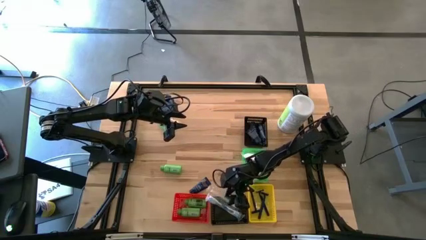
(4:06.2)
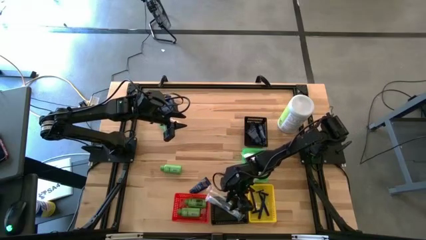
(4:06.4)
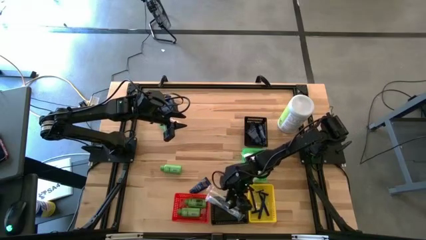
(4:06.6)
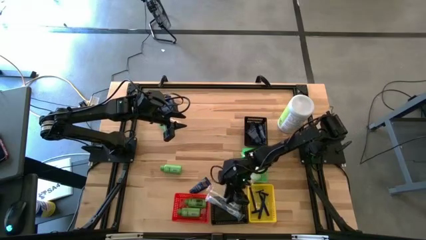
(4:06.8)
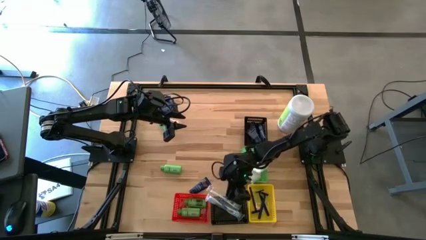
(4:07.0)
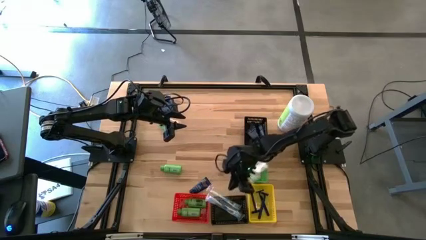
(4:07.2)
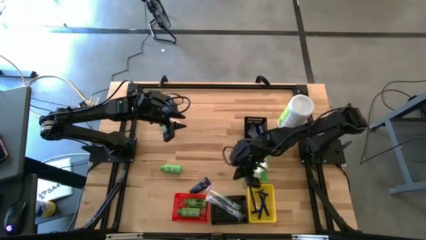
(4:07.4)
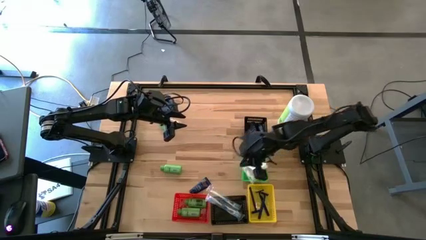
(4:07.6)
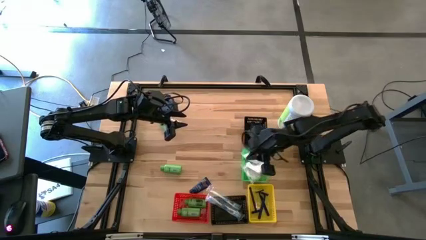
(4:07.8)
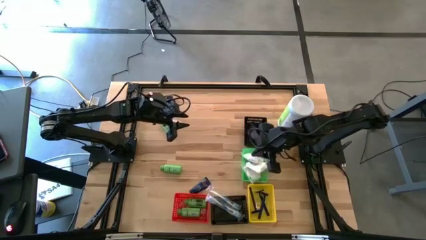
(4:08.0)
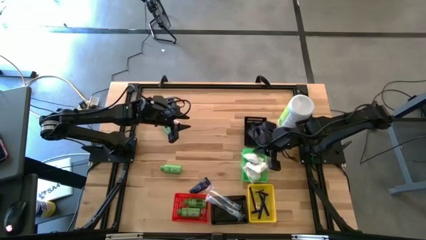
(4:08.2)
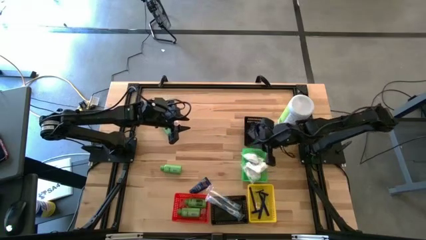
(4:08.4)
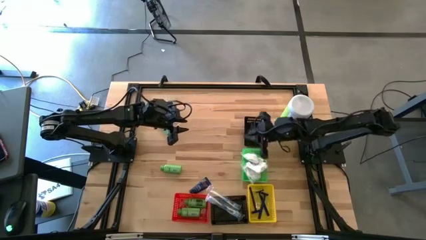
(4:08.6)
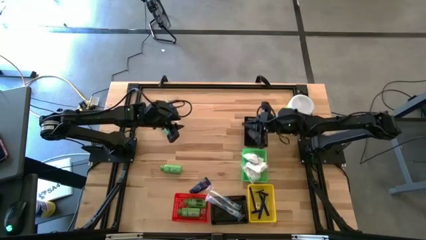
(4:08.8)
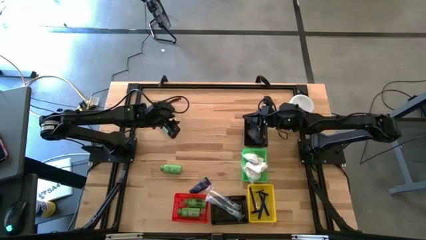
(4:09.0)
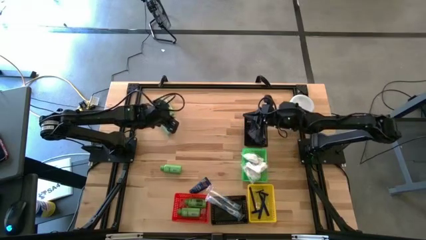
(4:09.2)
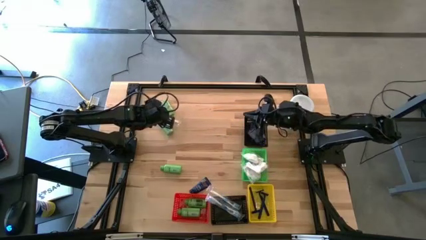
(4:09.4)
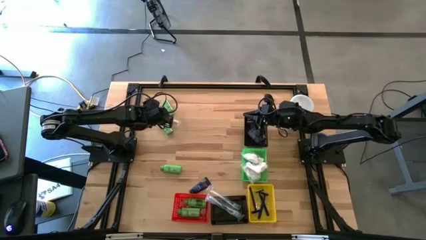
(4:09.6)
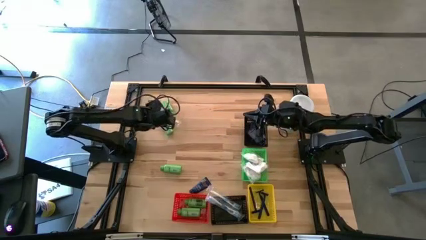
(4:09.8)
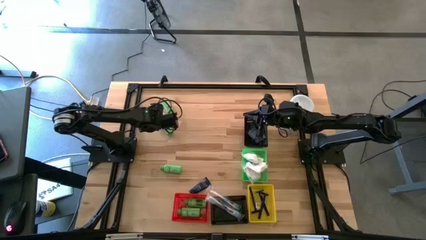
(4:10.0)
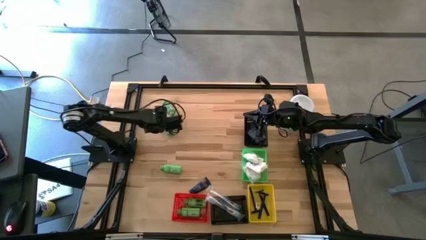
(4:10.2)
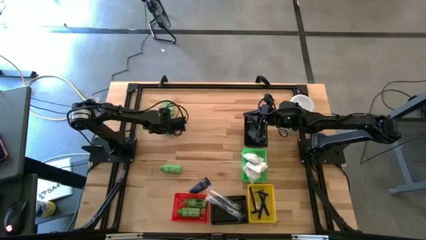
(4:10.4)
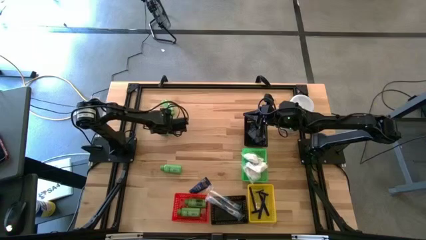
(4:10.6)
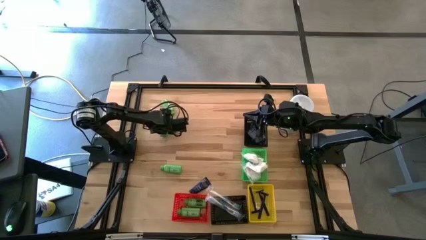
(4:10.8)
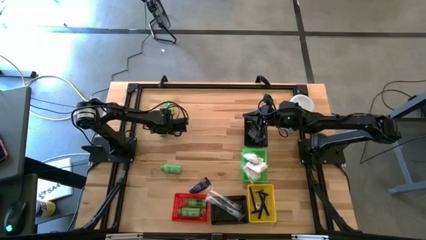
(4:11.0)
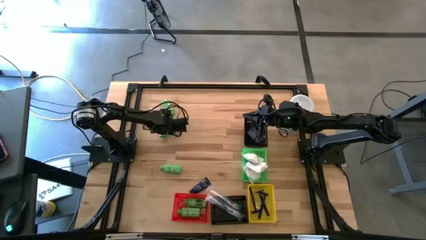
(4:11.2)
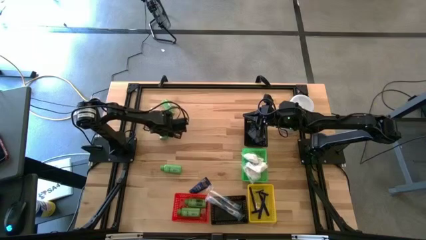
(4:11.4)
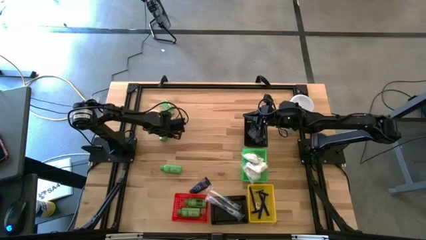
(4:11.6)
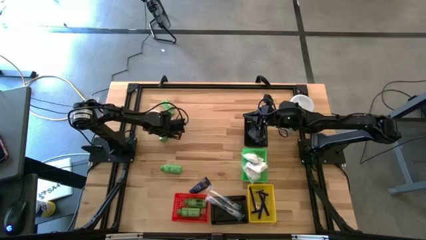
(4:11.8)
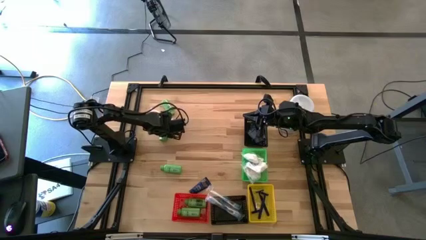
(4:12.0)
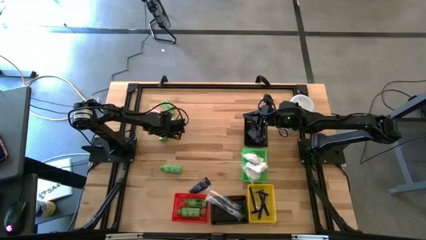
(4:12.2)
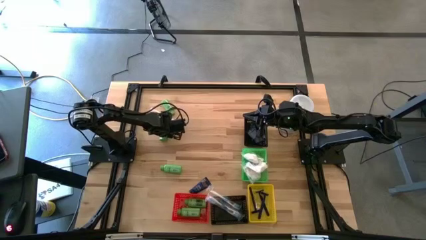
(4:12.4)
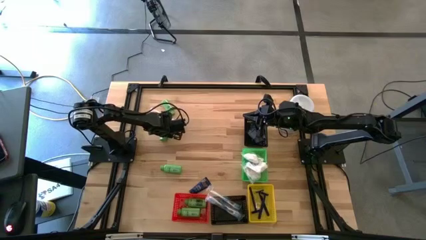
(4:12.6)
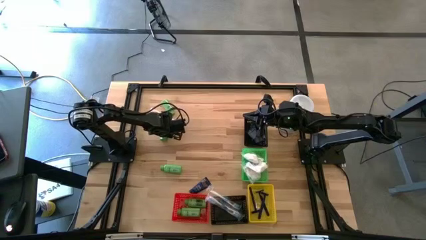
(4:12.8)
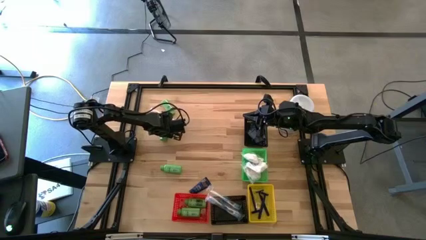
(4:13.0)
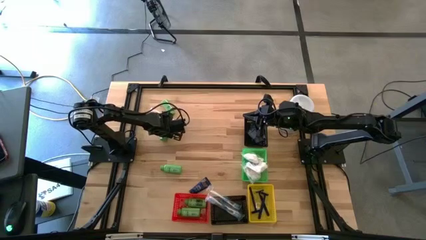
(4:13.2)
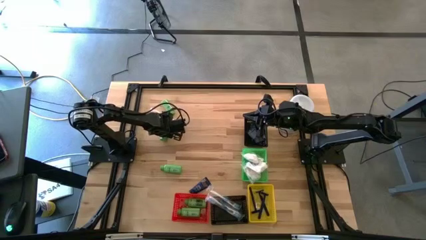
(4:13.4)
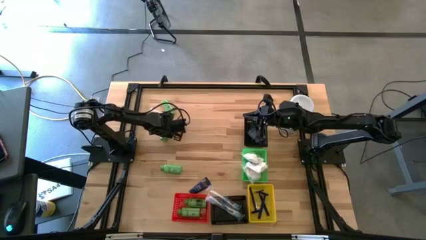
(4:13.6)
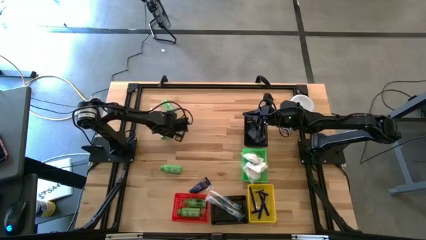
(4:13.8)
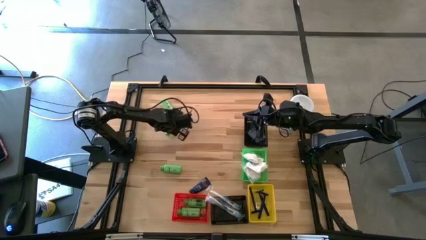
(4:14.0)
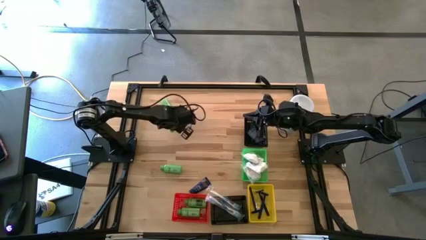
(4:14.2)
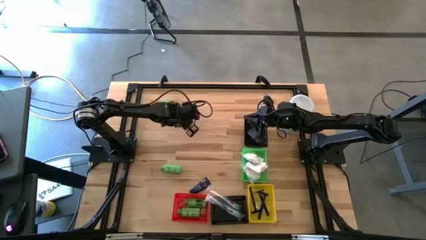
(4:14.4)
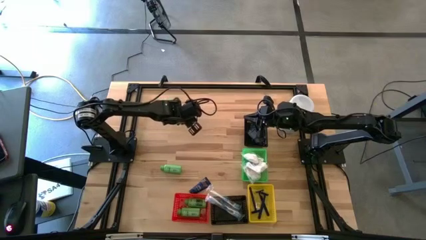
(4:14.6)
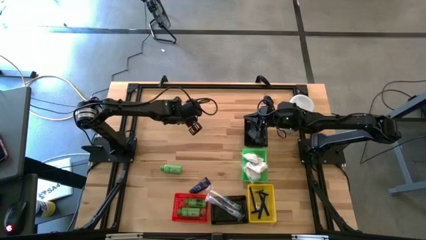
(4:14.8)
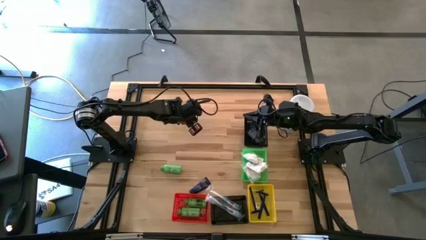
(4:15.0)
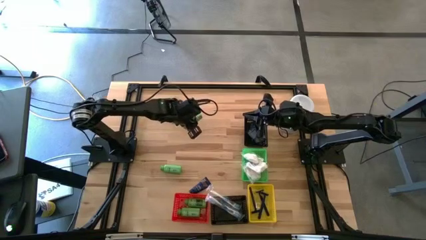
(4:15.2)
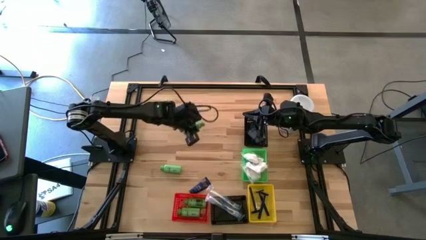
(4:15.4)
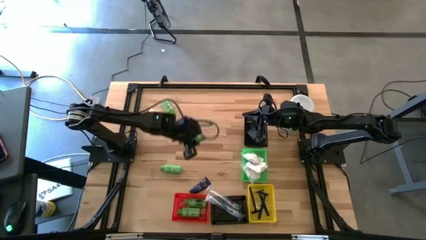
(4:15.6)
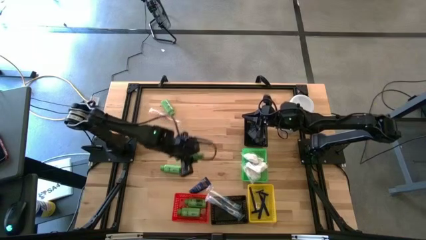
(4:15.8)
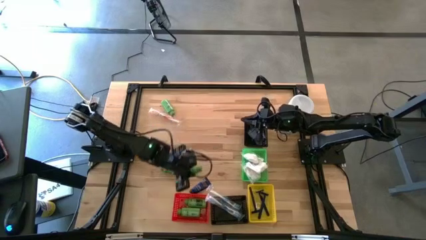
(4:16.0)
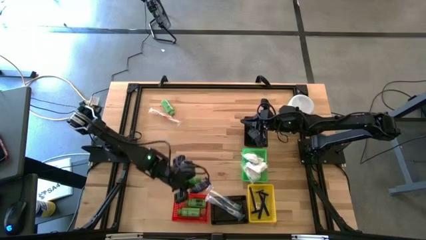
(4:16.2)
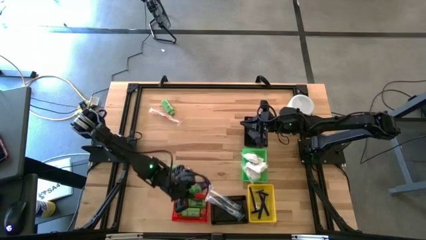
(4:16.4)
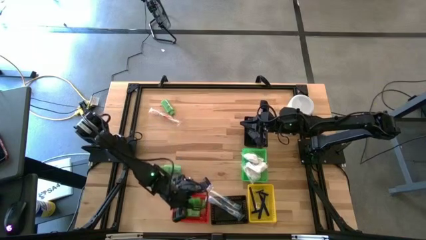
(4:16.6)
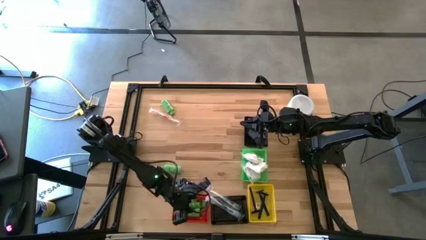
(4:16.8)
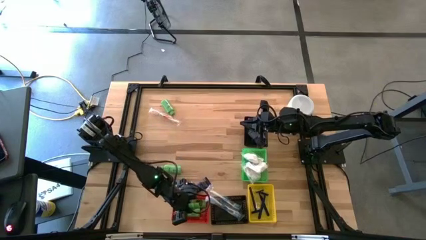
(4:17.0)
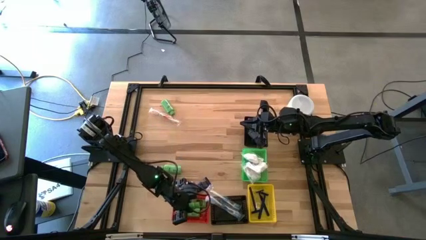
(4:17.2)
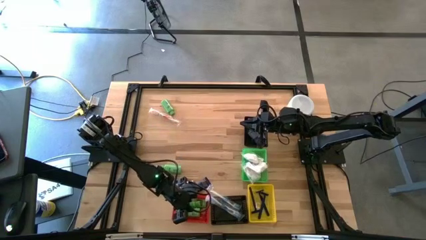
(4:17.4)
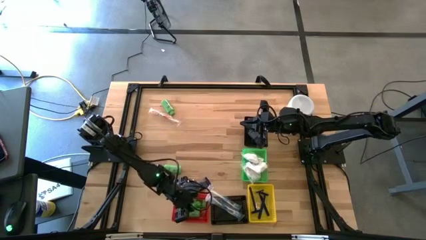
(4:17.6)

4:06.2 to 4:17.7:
Task: Pick & Place Travel size toiletries
Put the green shampoo bottle into the red bin

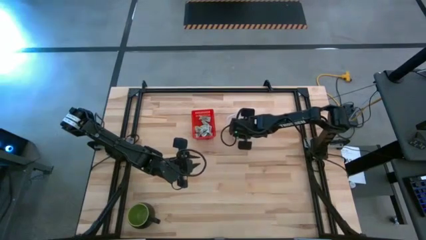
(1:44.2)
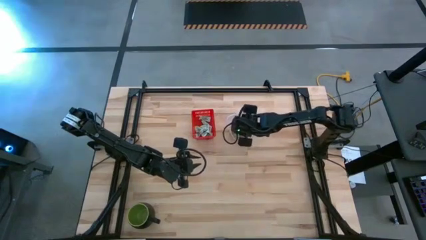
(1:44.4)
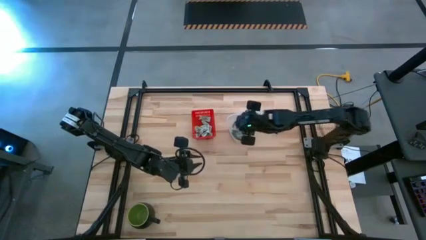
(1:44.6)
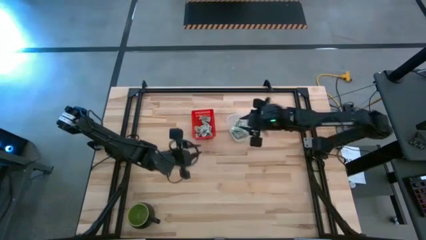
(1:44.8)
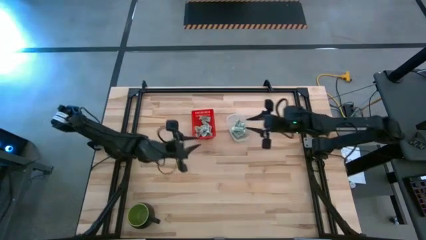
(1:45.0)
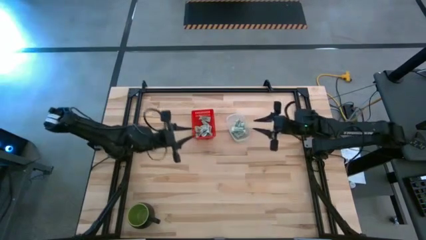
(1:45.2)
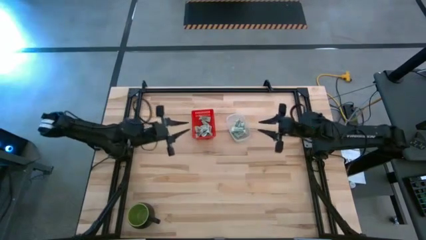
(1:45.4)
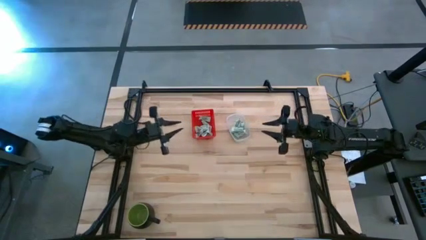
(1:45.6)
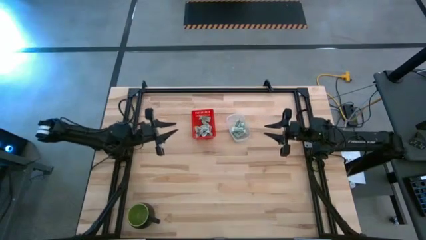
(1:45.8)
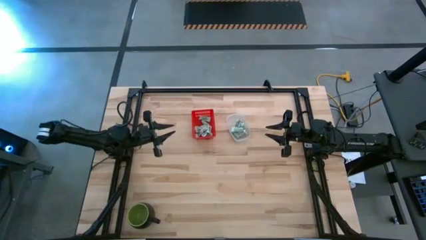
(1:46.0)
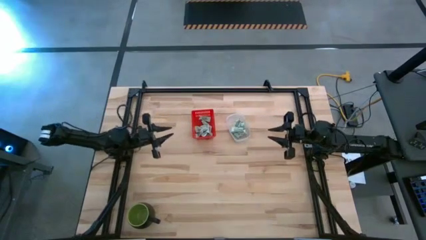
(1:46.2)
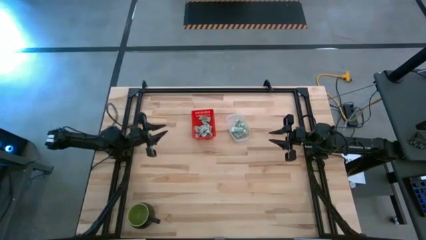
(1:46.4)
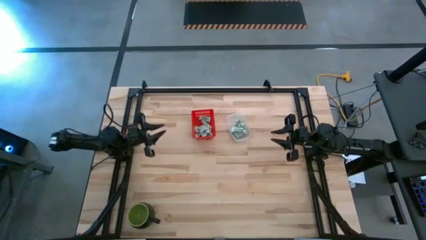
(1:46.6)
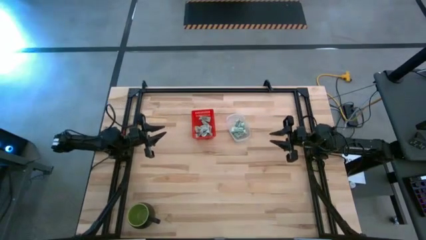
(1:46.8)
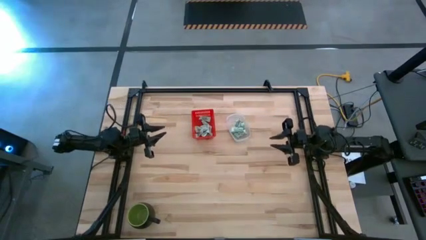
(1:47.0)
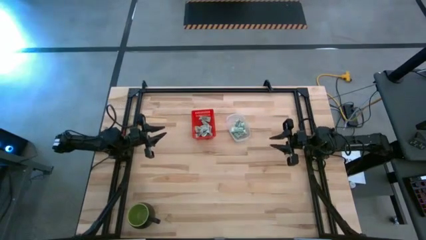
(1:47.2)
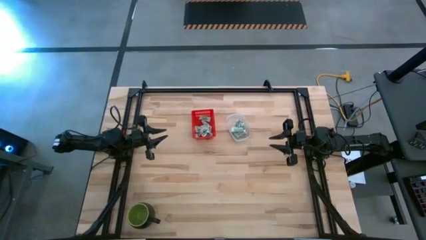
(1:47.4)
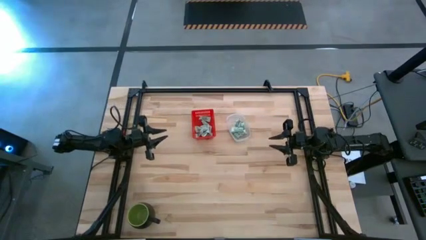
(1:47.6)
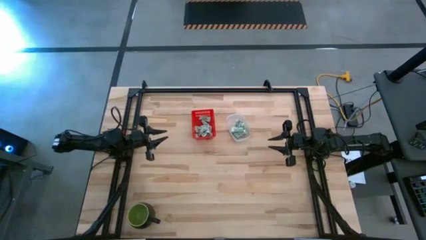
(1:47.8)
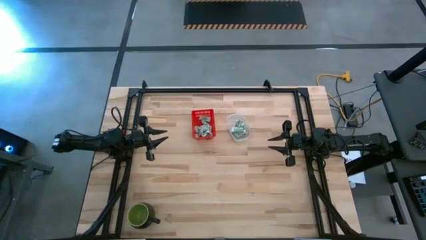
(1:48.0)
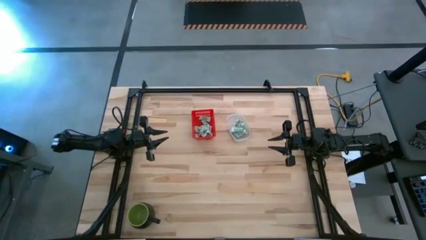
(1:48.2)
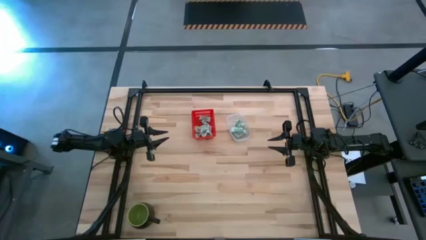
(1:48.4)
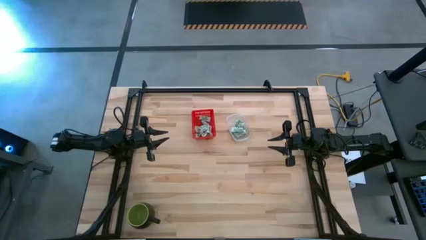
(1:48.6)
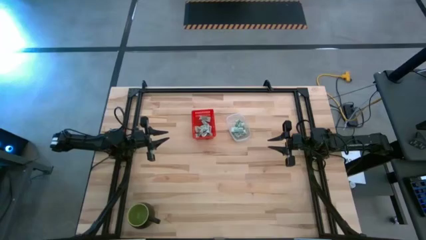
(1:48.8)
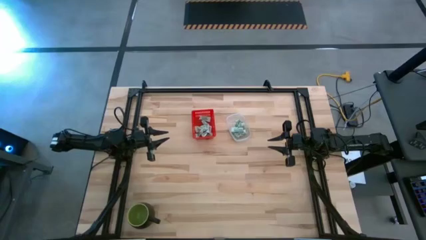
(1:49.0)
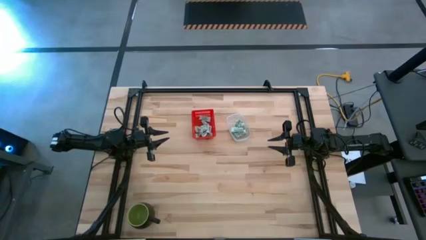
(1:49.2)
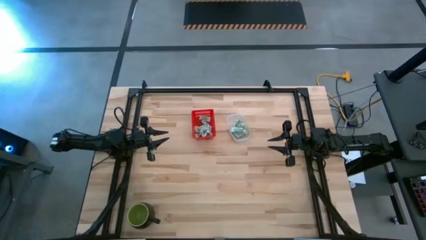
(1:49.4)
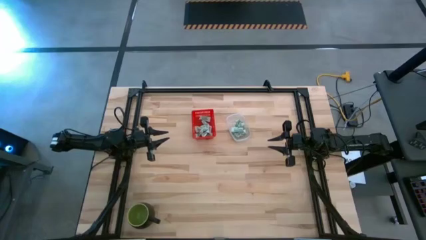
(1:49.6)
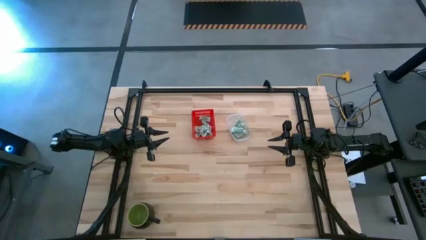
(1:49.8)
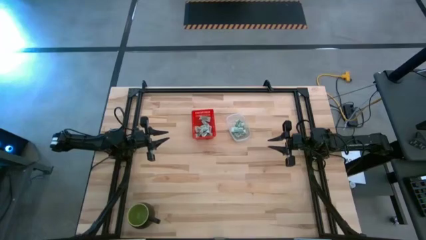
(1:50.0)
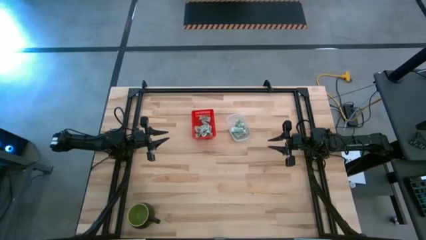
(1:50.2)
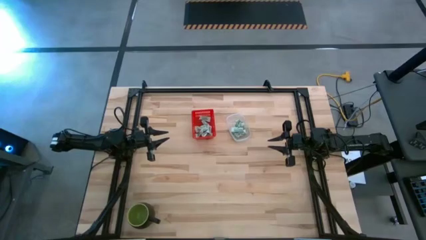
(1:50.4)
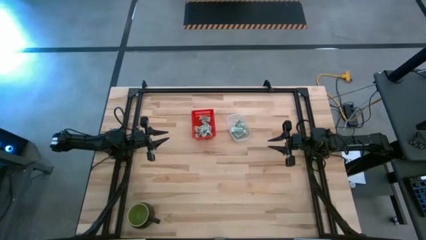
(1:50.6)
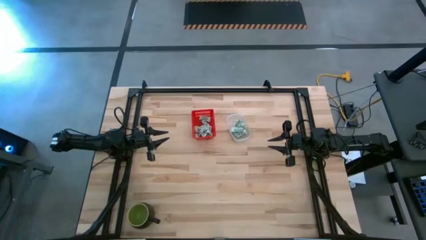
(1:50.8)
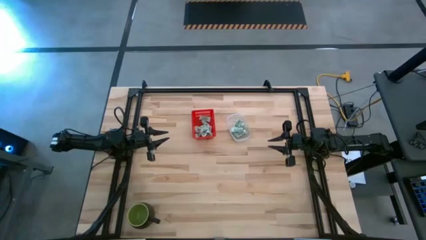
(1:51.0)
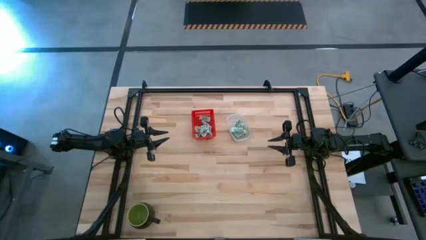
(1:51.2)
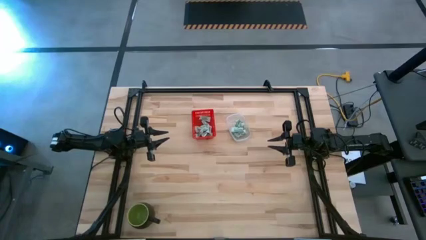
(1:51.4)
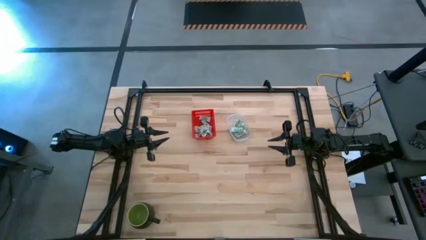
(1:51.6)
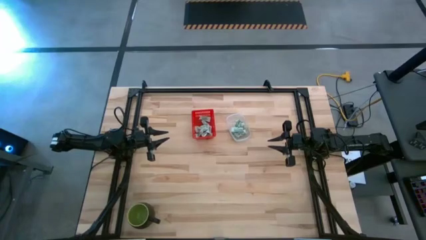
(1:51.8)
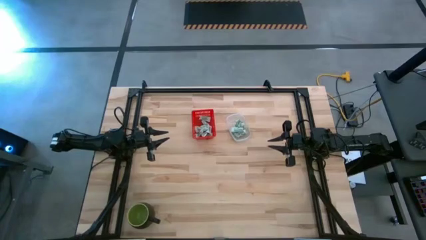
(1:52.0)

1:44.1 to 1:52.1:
Task: Pick and place items into bin
Return to Home Position
